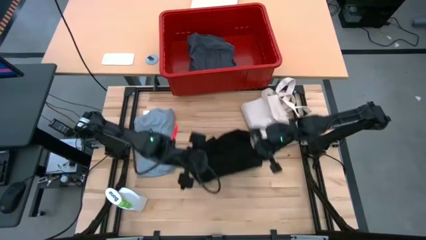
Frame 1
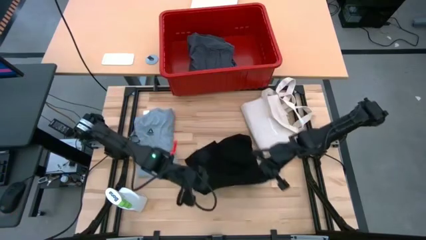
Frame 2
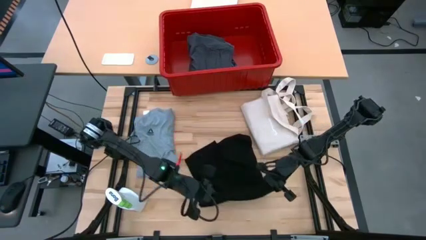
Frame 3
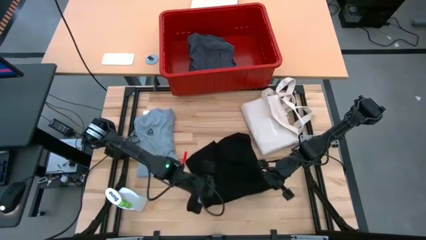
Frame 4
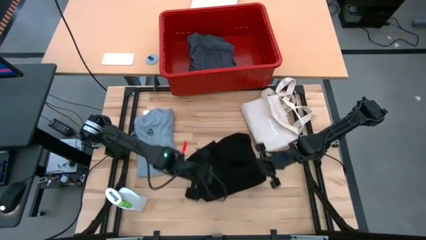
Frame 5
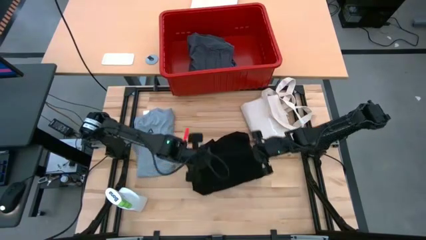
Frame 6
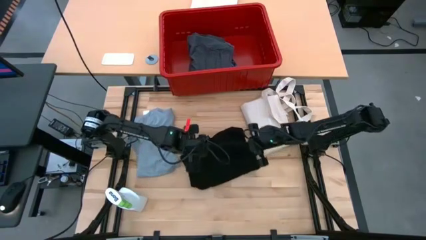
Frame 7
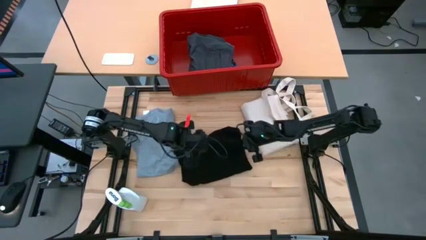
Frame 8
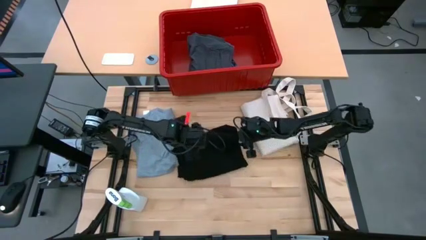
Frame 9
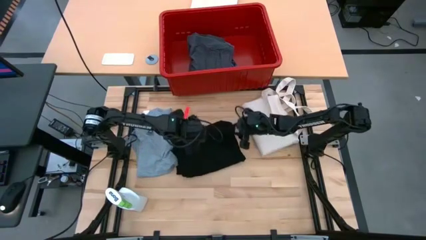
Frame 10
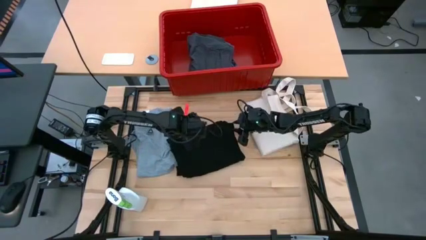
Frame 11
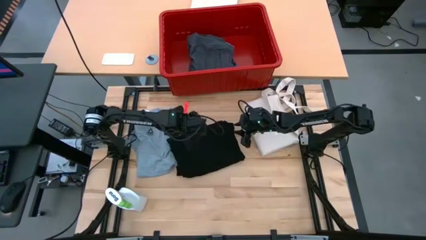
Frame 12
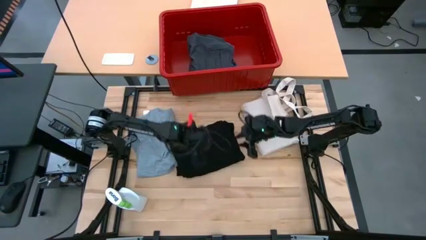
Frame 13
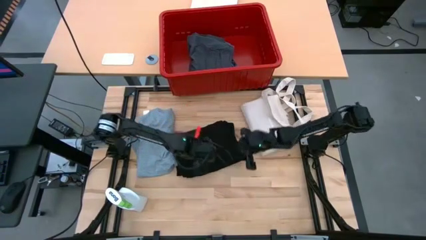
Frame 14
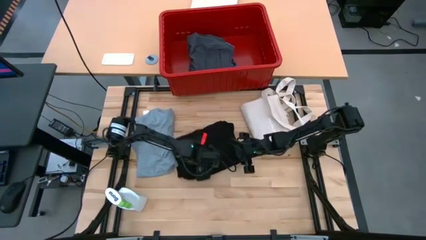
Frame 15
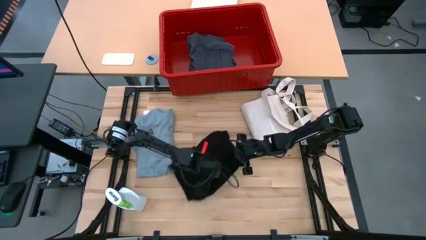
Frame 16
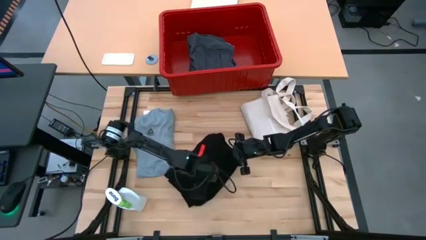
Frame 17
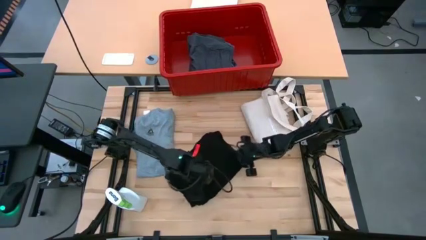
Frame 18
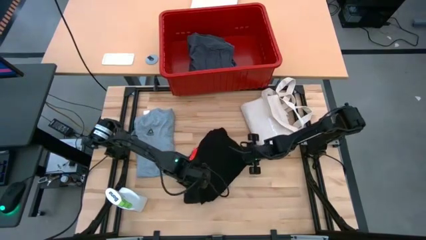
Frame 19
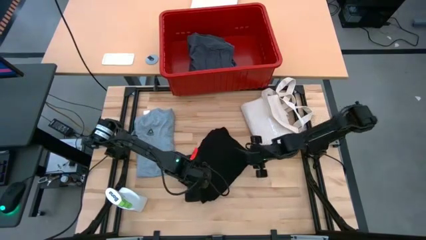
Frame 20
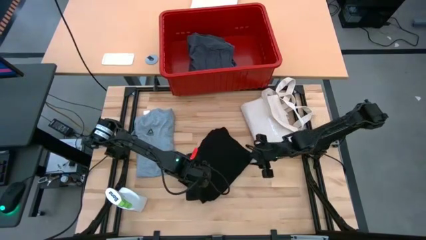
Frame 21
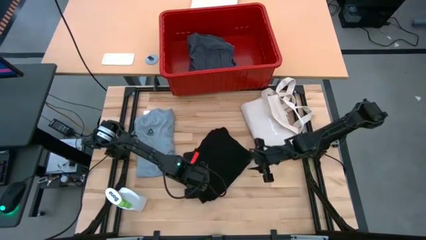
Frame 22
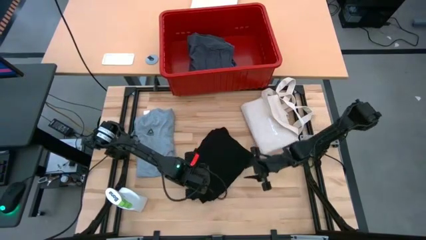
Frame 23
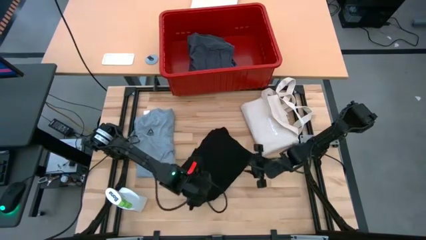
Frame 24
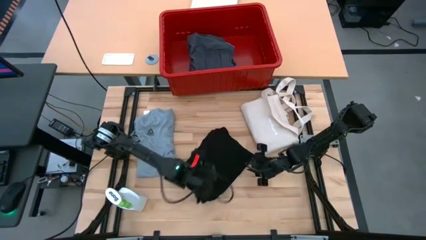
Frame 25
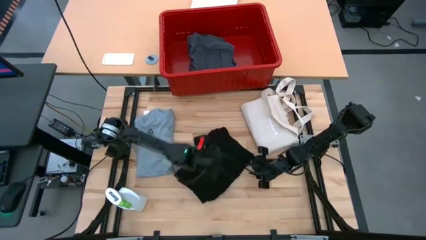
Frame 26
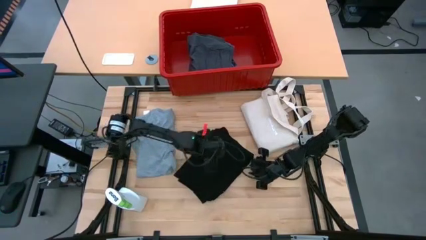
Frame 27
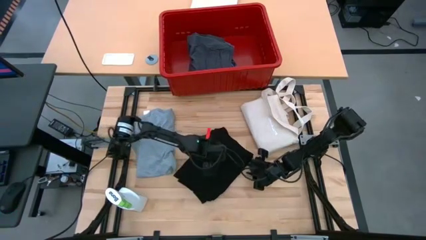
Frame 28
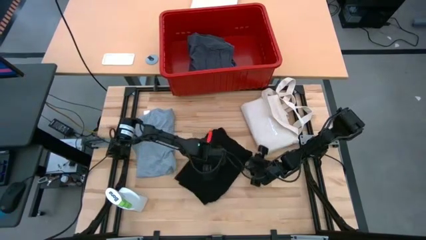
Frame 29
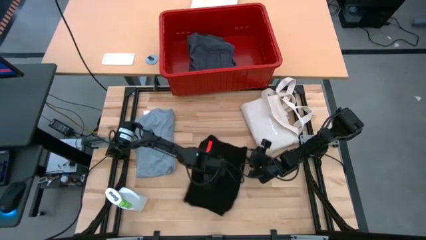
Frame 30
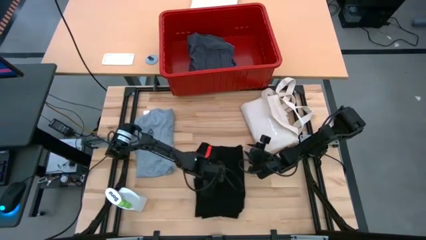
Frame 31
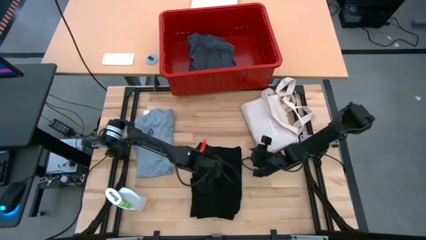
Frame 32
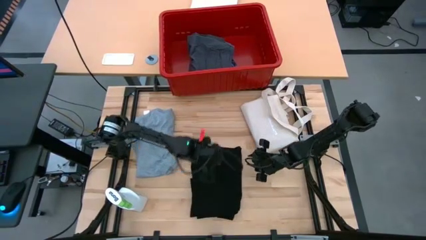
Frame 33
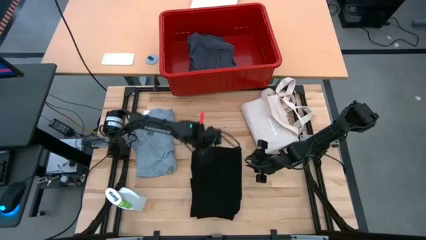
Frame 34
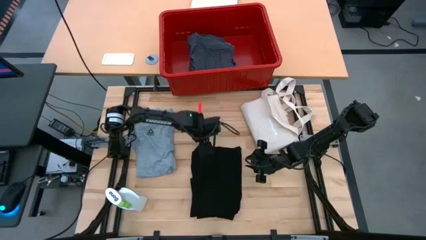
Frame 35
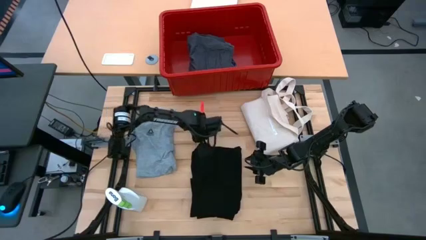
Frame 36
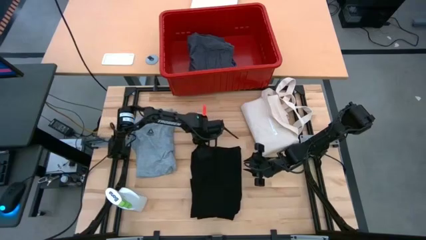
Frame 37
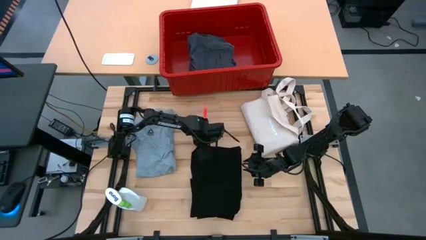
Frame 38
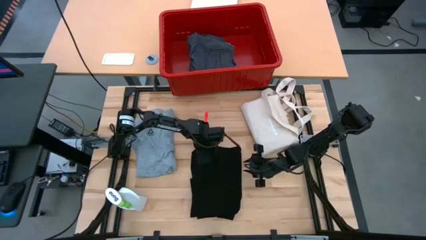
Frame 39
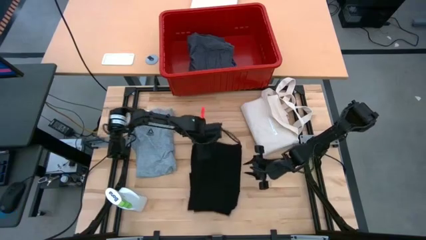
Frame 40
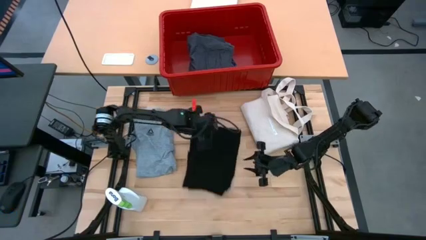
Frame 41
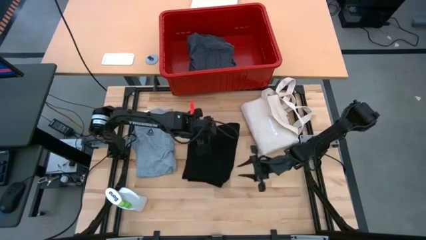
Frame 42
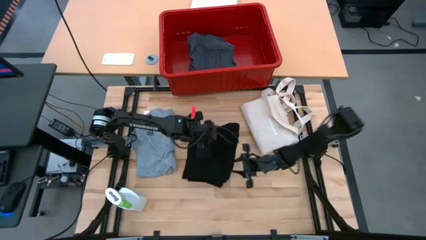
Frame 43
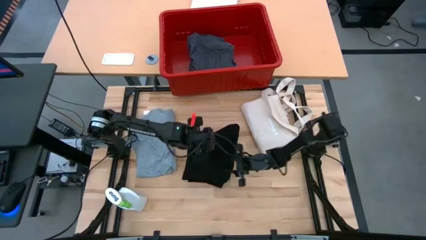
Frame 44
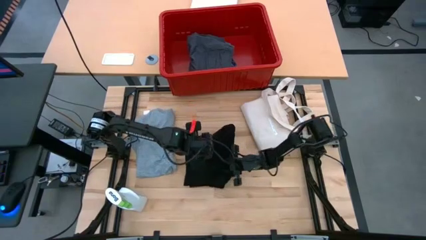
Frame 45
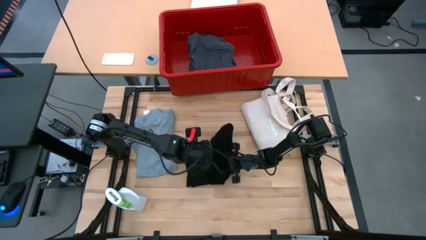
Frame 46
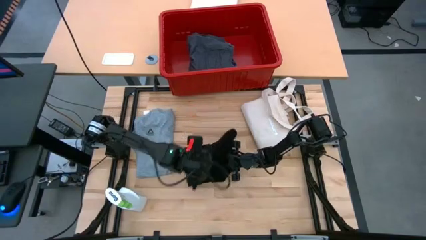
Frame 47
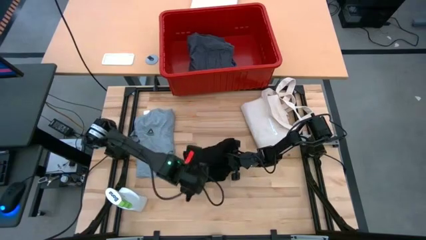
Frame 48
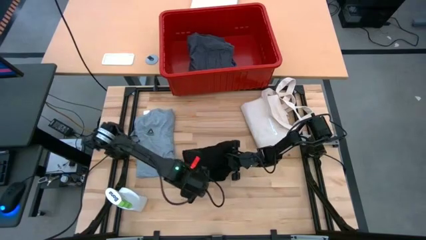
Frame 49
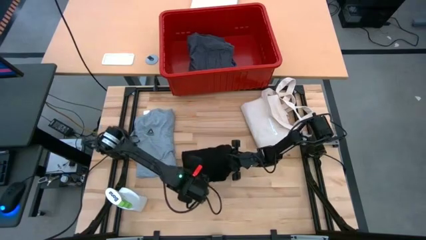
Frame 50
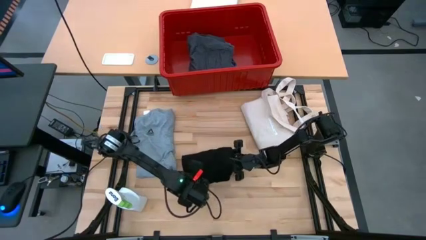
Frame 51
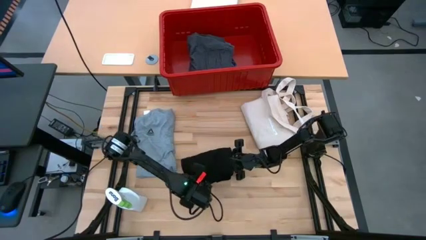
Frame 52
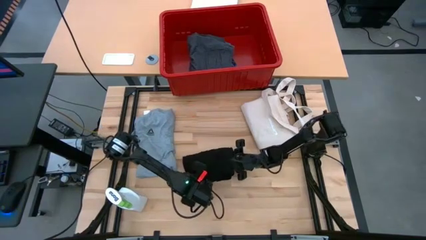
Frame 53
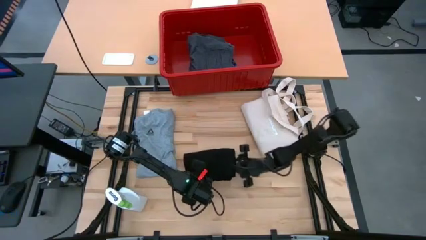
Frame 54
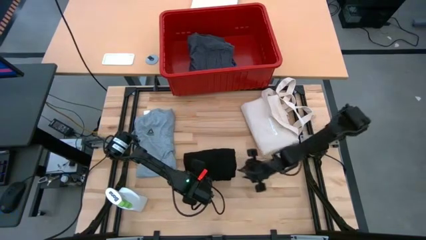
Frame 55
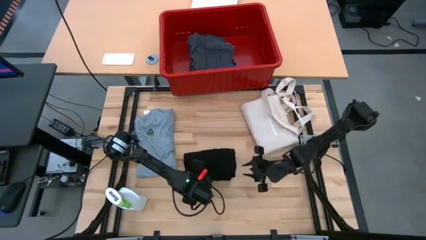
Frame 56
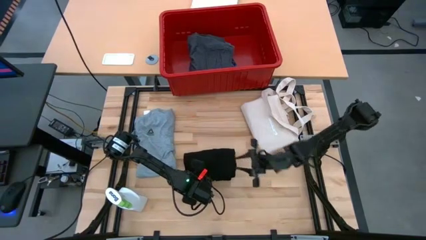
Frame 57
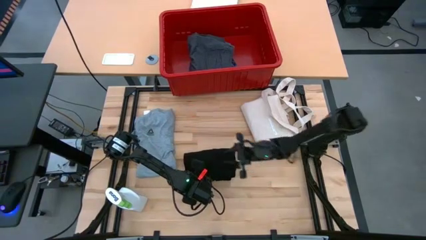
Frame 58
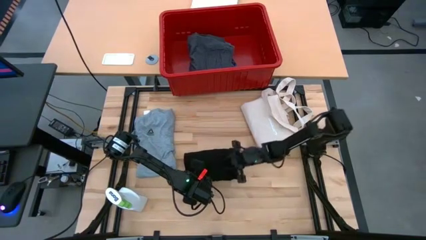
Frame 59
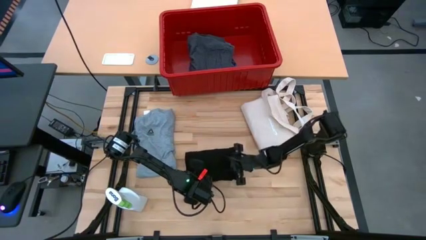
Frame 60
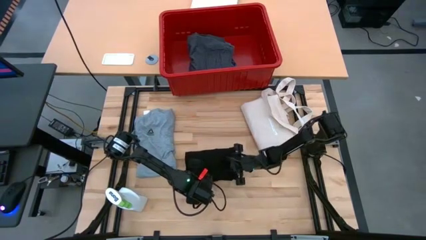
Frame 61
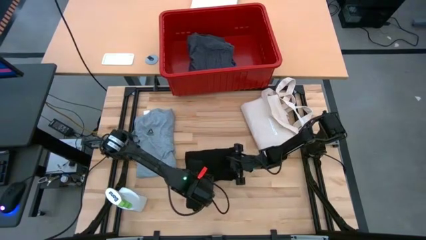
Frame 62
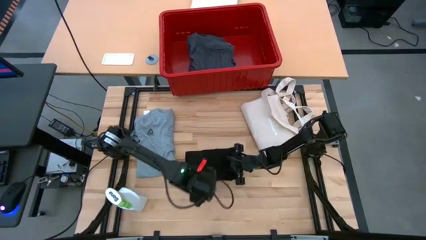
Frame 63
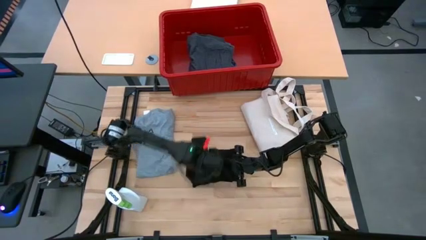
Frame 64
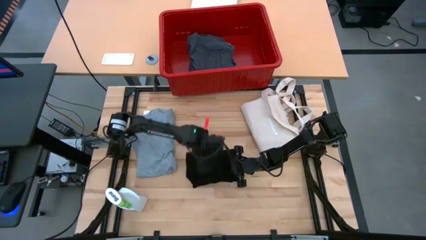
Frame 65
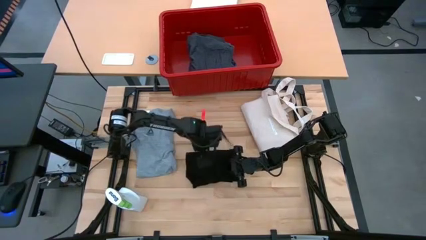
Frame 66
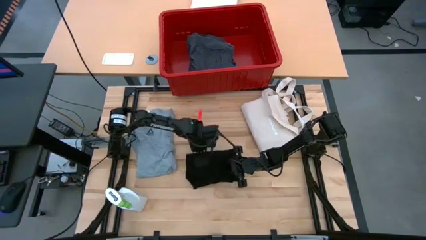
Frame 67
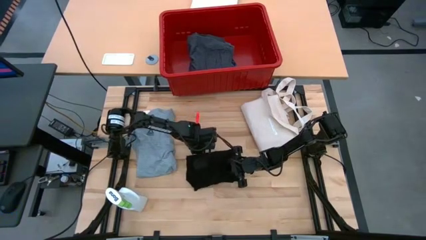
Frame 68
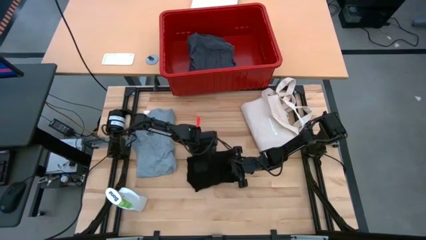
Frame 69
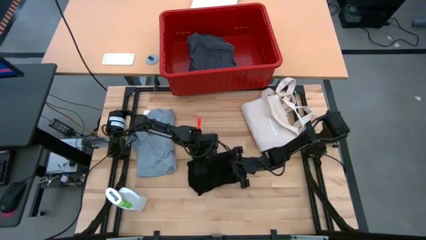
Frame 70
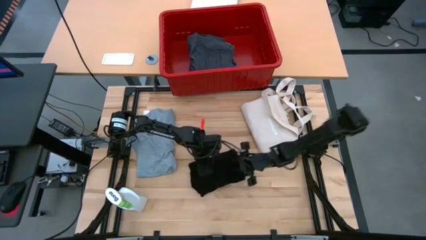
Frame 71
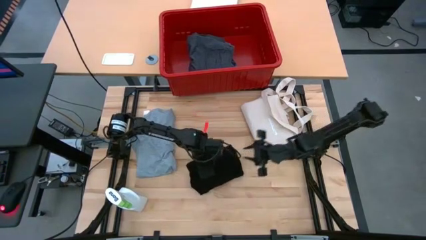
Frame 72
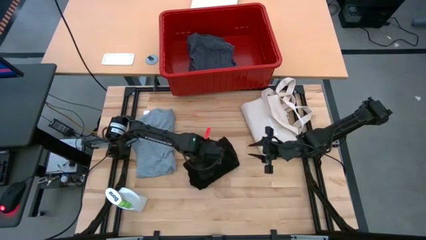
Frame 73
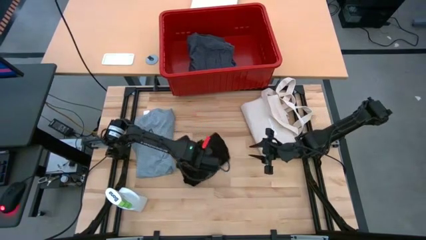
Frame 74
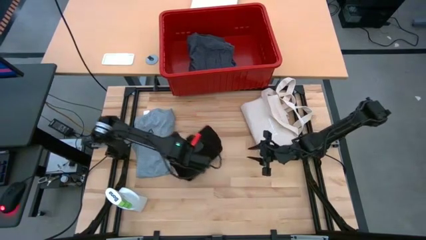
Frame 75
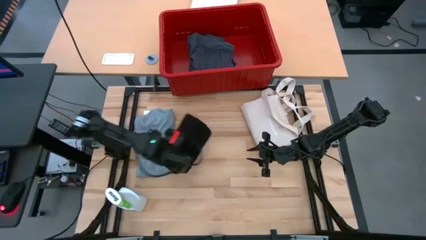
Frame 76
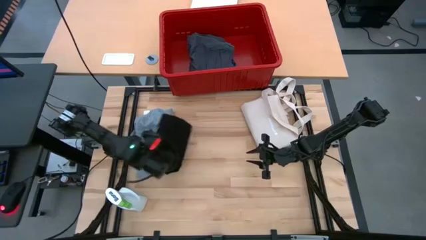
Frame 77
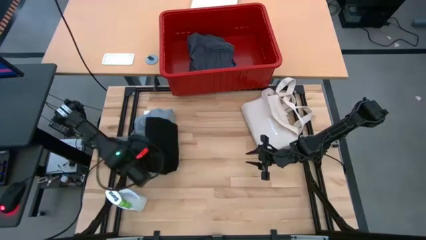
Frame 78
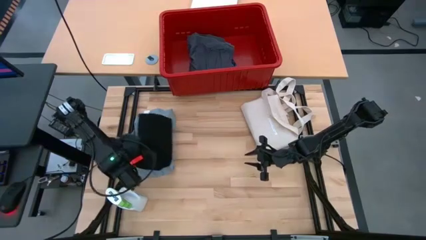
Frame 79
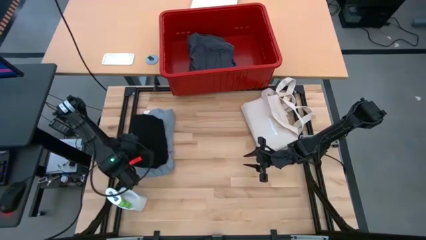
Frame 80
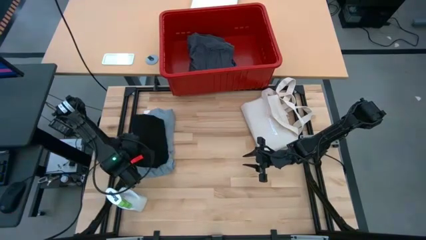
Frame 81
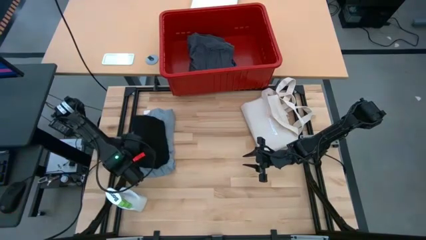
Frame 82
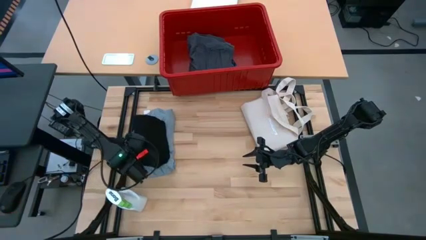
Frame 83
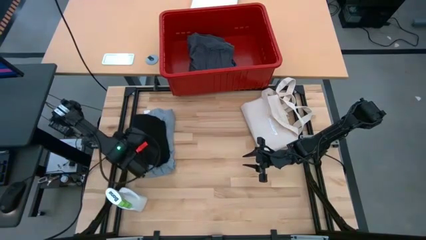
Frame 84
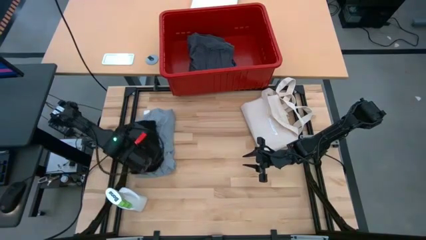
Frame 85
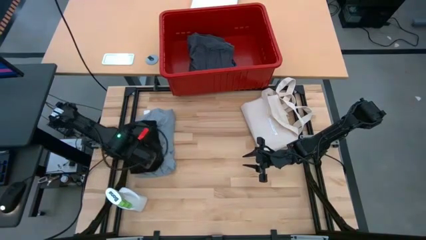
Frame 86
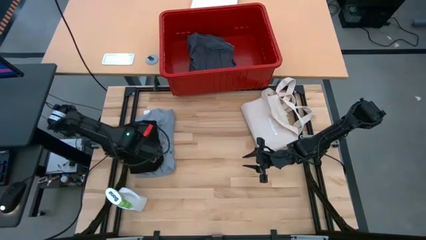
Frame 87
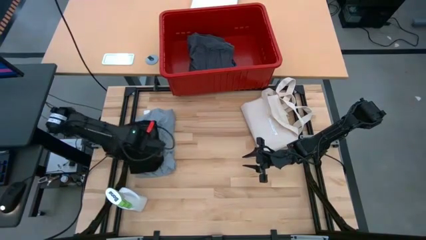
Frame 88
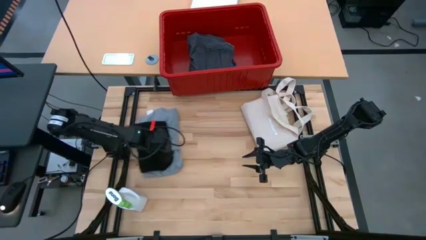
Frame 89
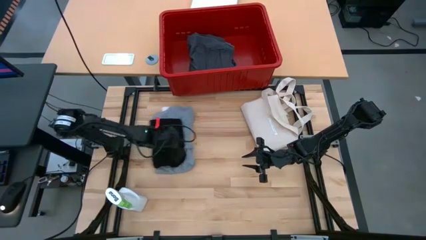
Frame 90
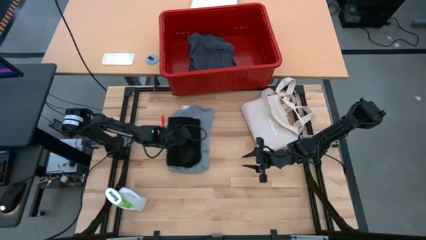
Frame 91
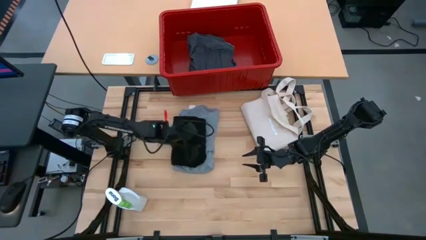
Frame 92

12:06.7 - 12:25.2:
Task: Fold Laundry from Bin
Fold the black shirt
